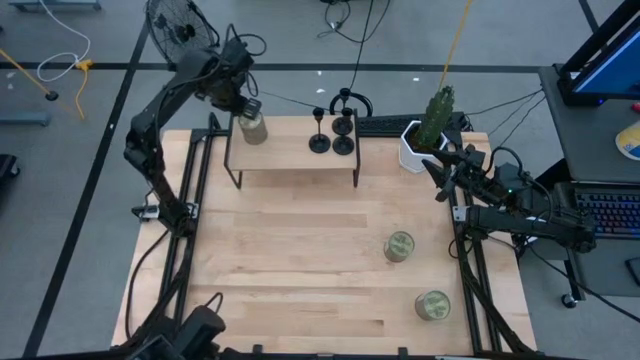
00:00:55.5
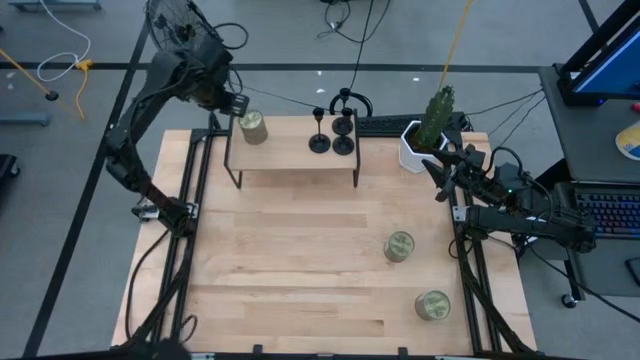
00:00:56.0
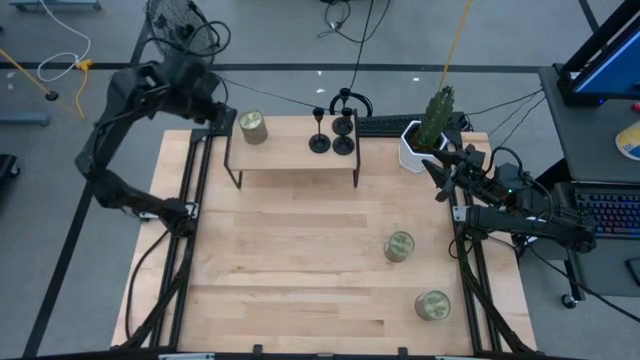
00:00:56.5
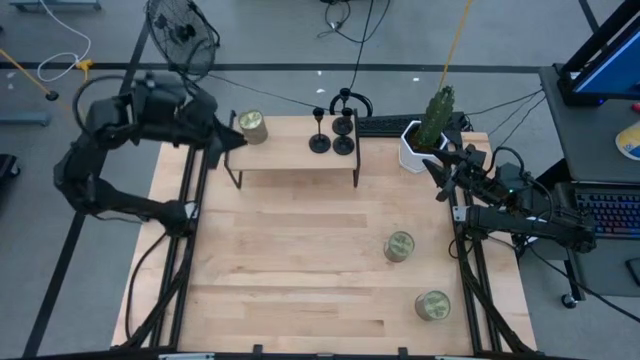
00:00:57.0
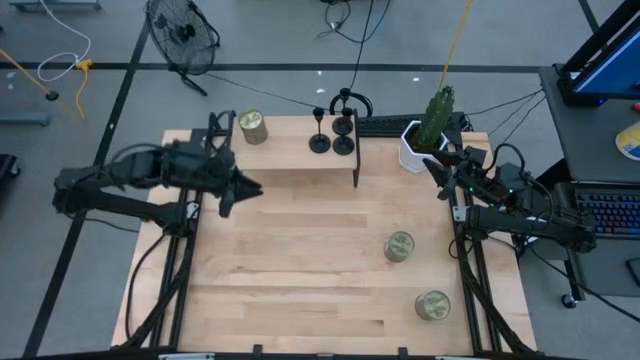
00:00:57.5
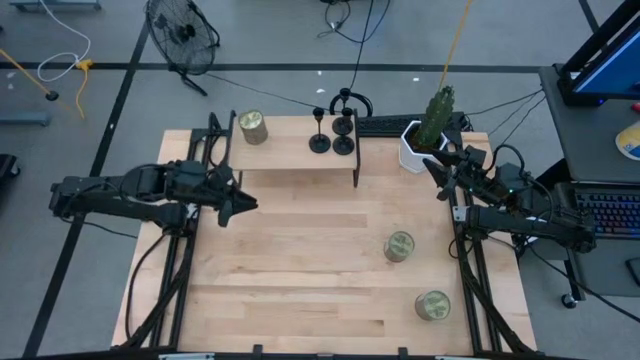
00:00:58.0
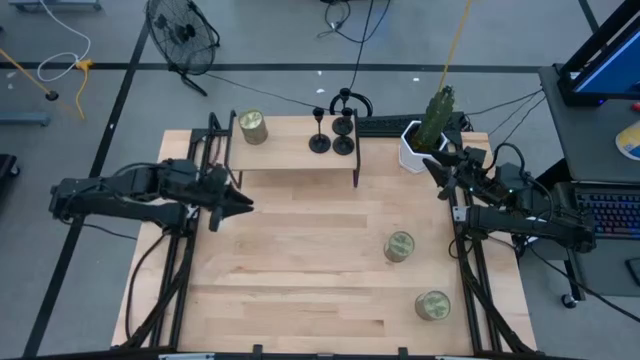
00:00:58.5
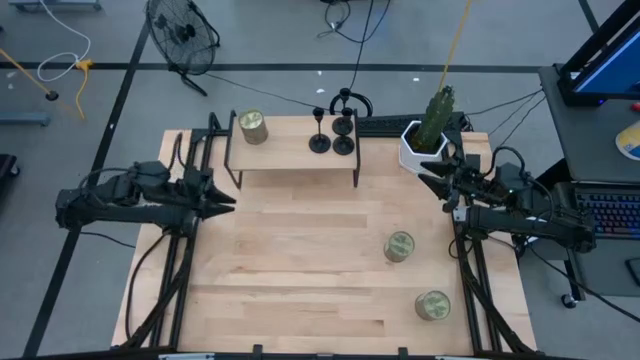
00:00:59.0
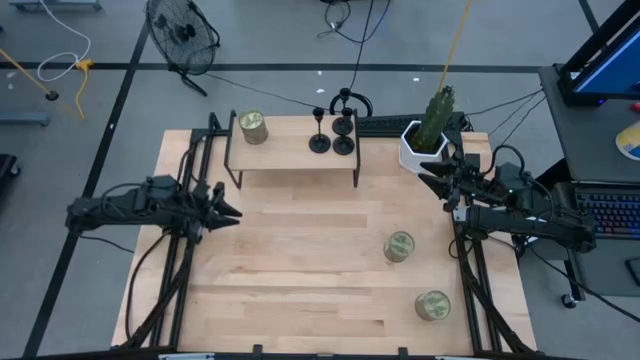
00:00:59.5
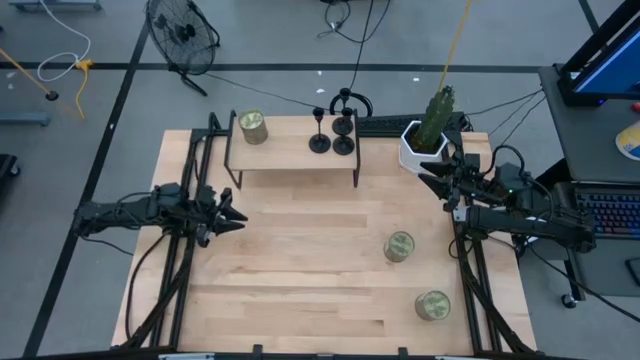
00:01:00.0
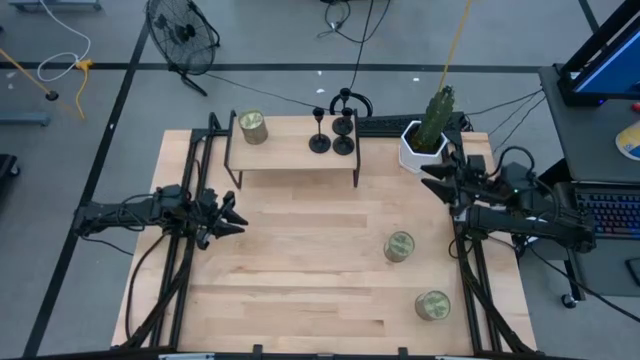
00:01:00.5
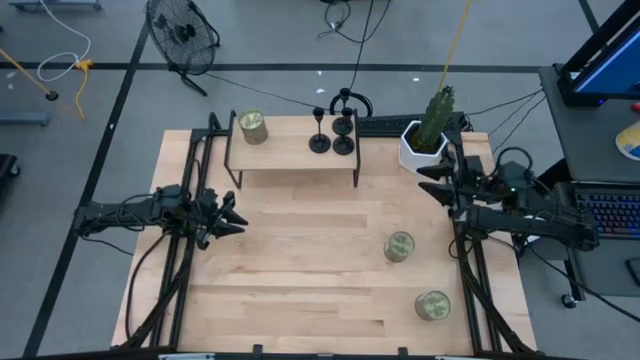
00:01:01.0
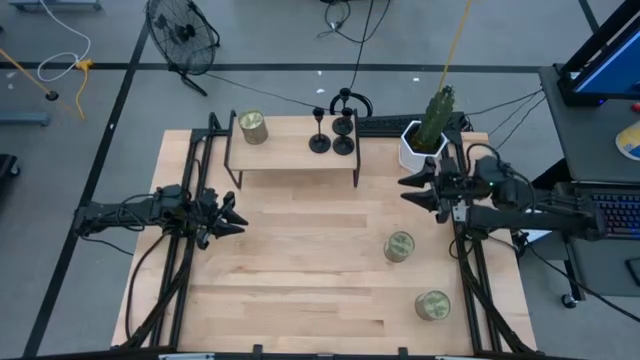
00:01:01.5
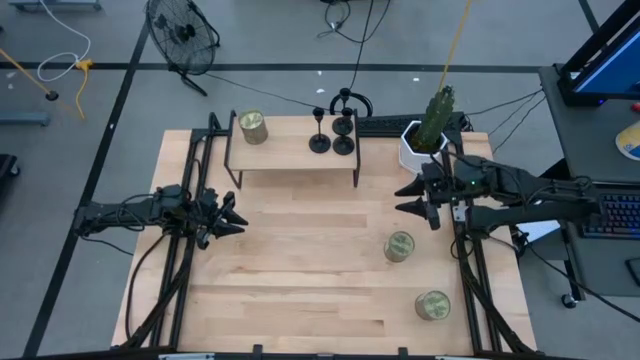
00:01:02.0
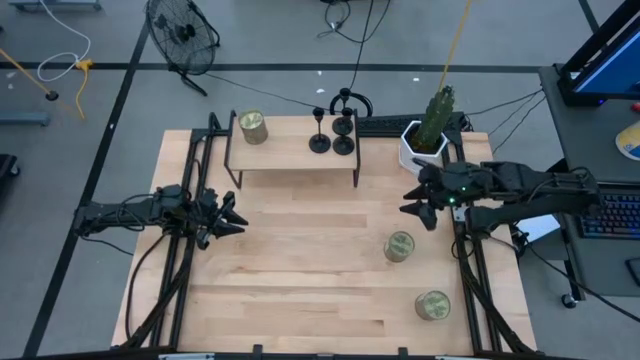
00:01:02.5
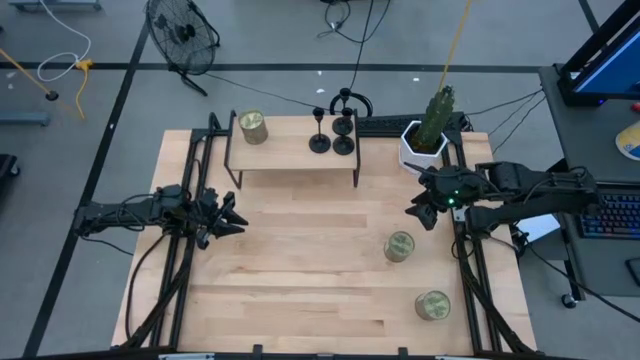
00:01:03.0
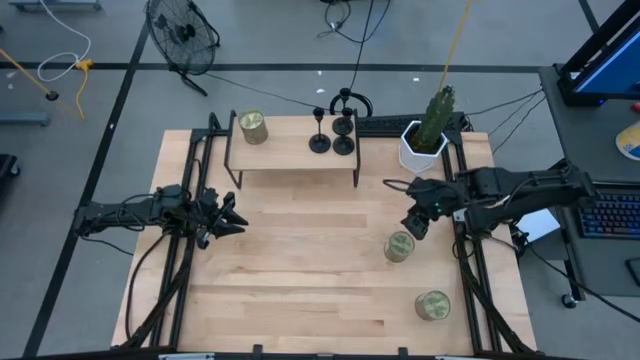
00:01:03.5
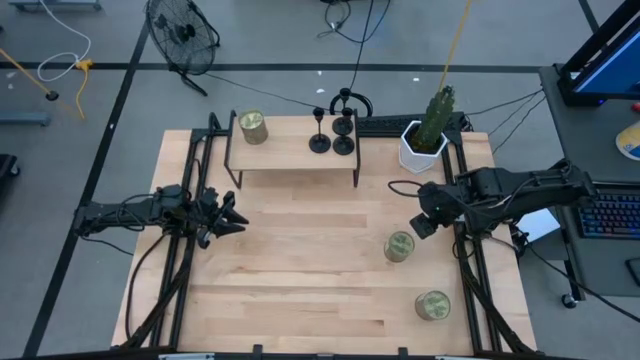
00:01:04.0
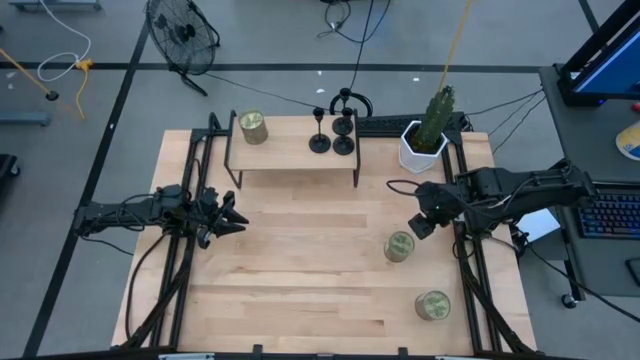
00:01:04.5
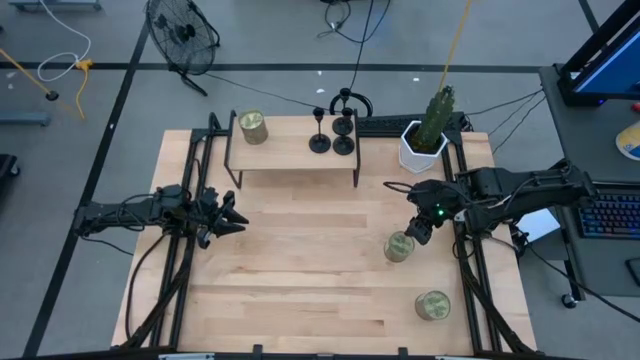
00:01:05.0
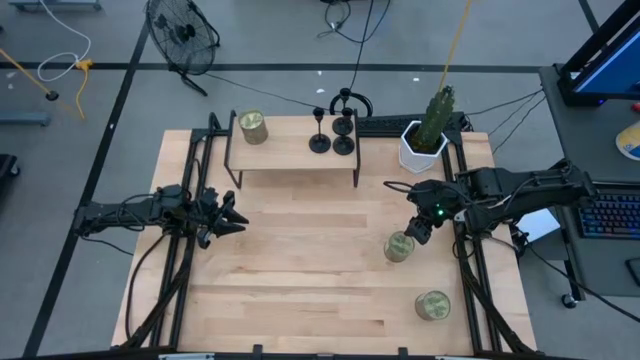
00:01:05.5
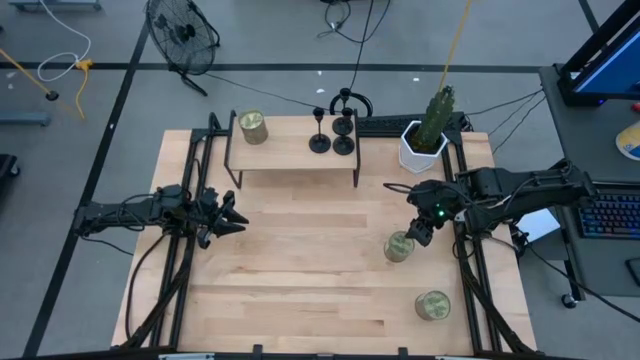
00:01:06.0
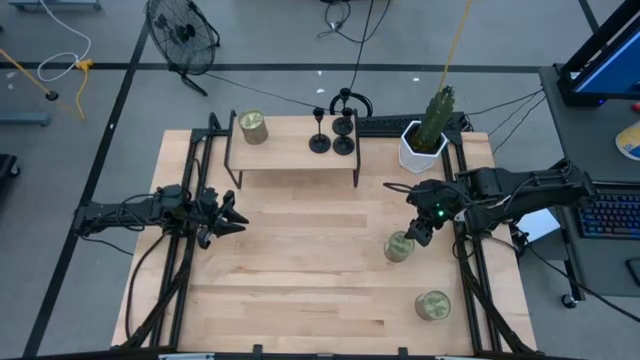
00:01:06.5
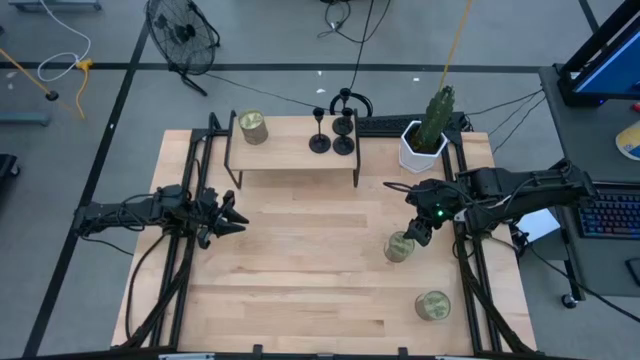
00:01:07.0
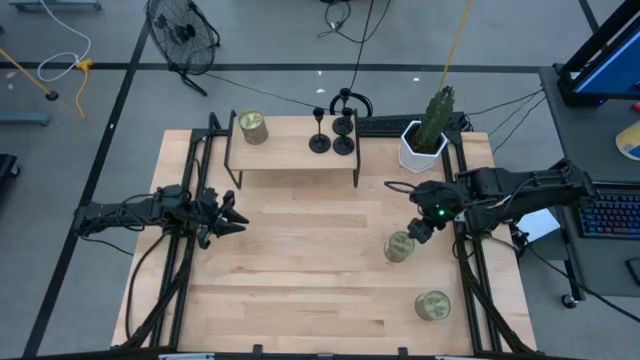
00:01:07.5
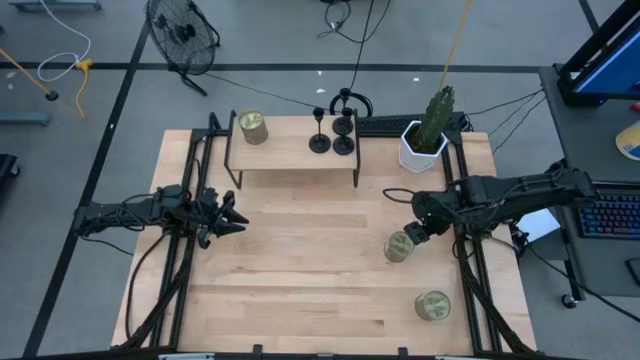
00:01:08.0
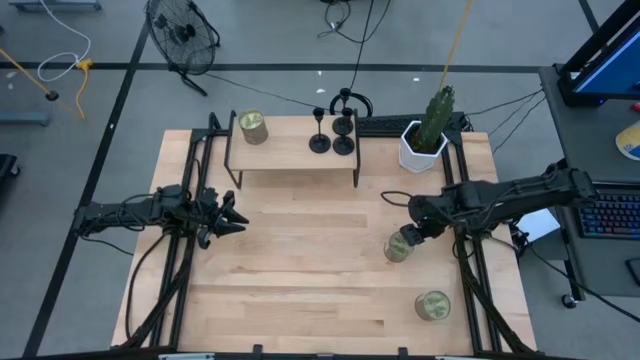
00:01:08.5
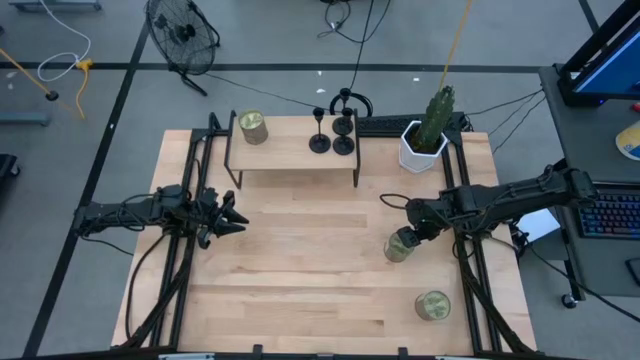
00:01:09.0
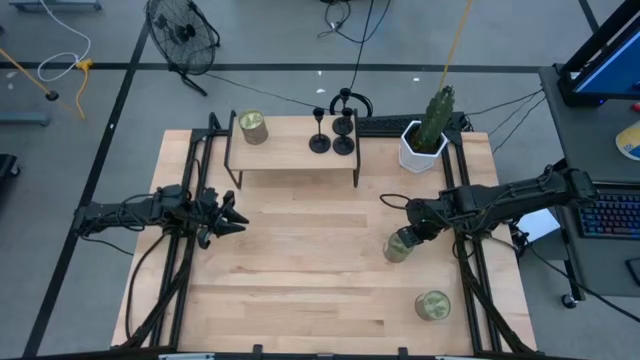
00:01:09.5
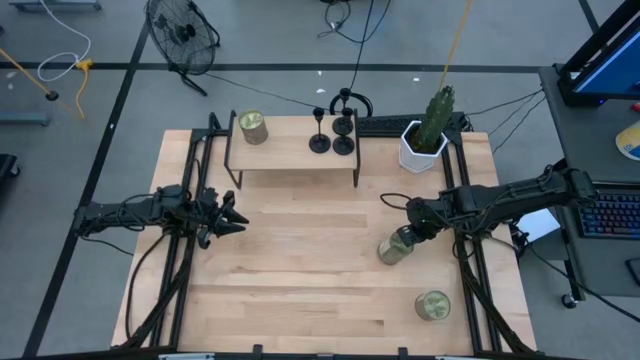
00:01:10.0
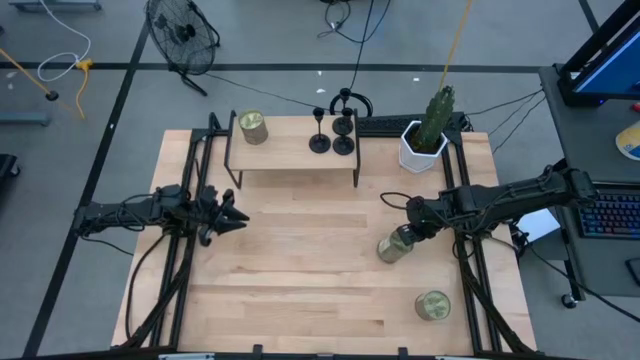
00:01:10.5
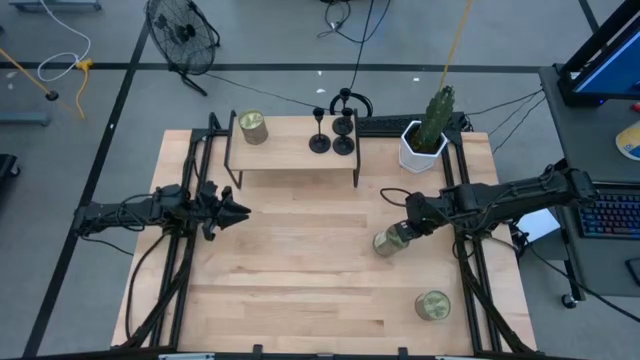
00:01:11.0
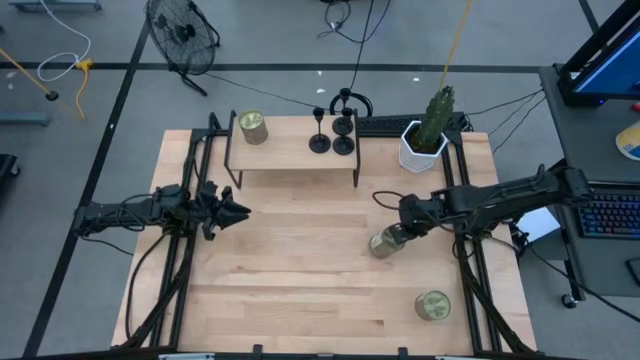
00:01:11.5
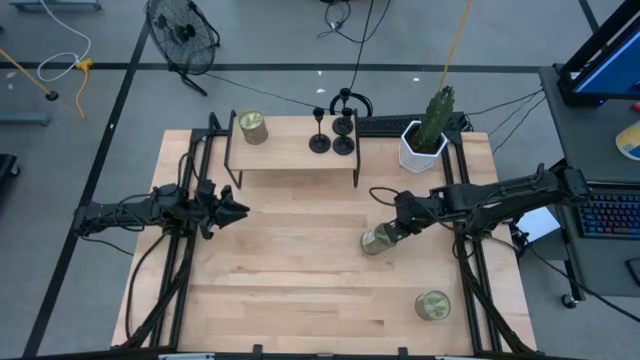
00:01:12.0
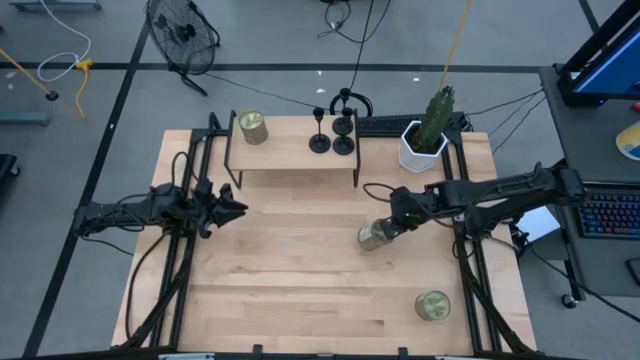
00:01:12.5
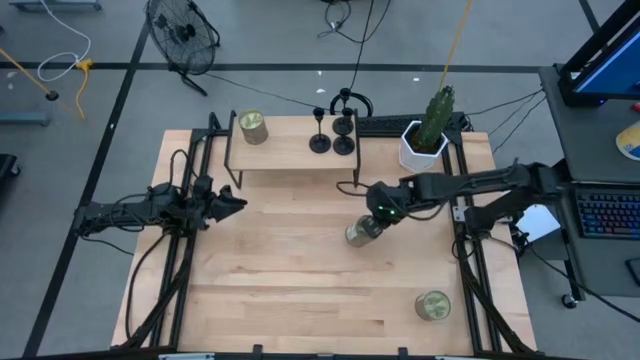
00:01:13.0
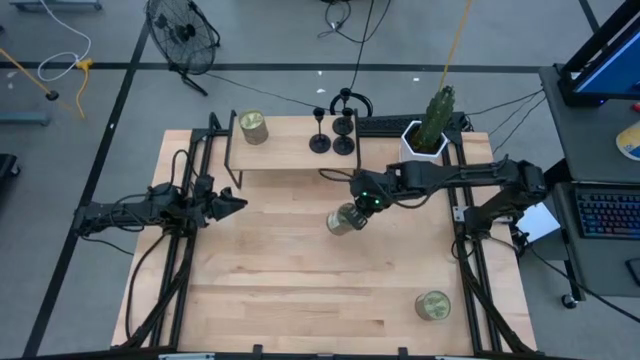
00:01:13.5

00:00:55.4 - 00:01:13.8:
Task: Pick & Place candle stick holders
Put the top scented candle on the shelf

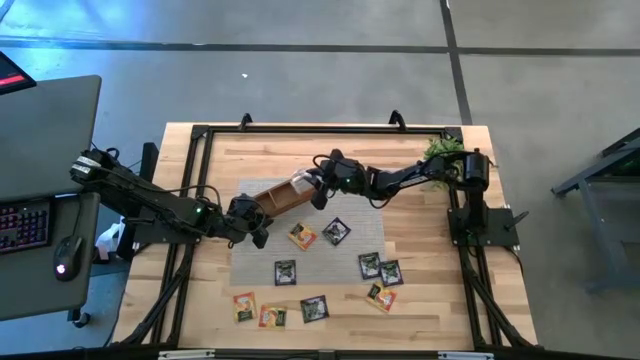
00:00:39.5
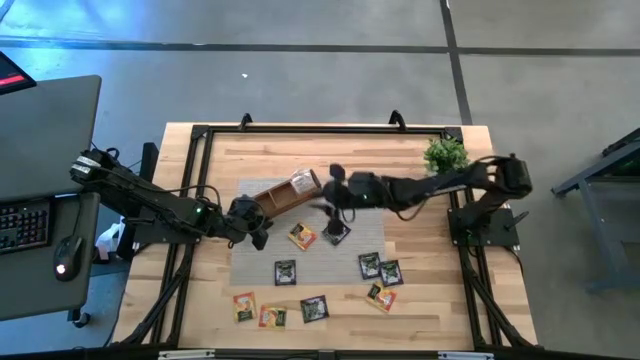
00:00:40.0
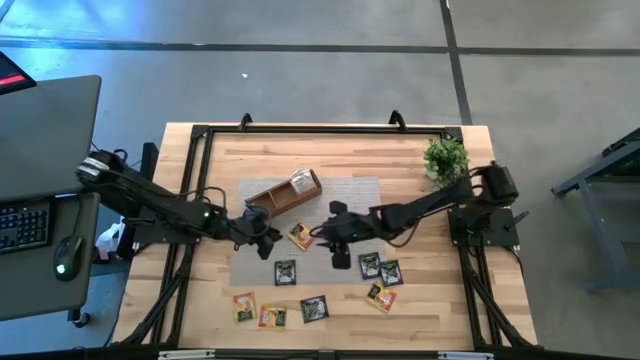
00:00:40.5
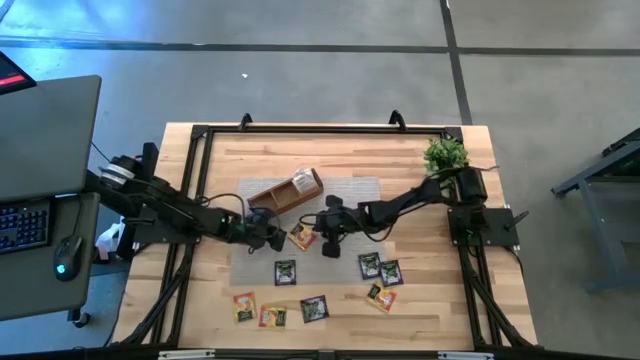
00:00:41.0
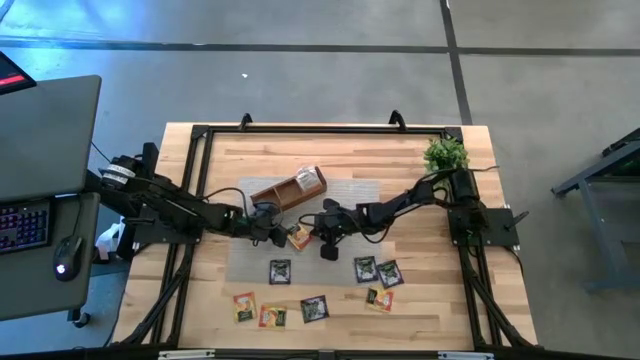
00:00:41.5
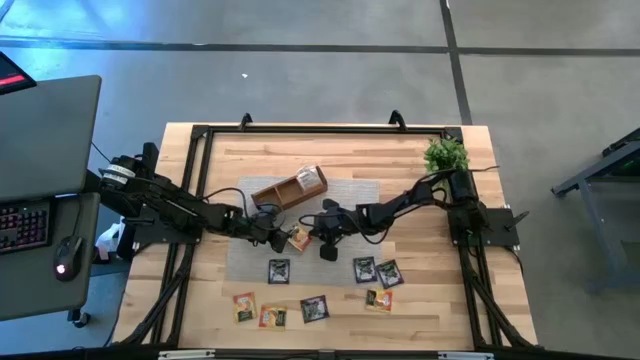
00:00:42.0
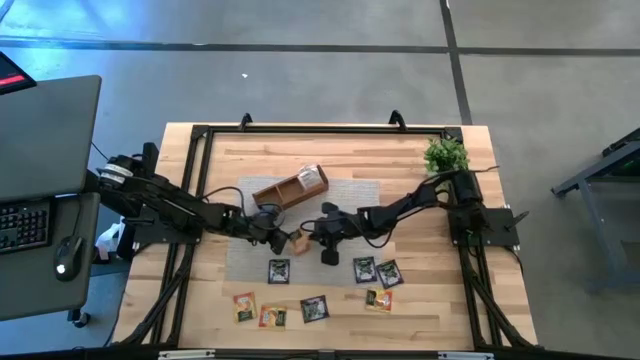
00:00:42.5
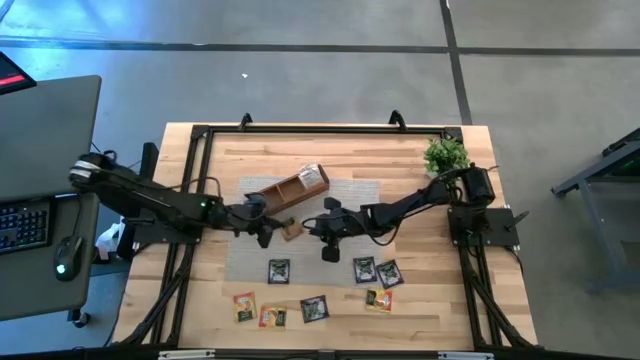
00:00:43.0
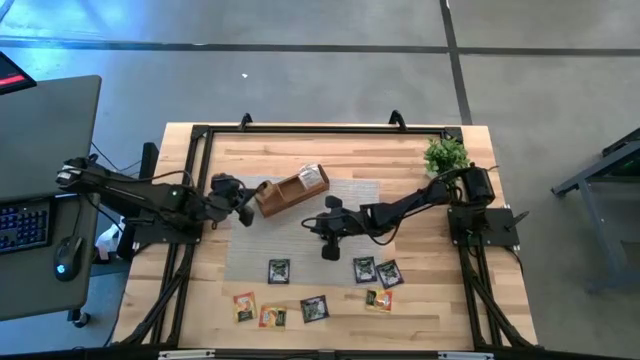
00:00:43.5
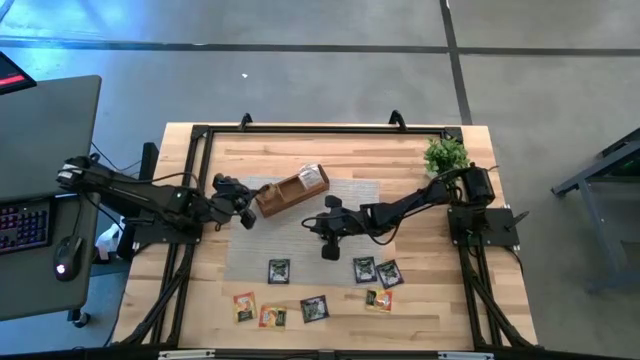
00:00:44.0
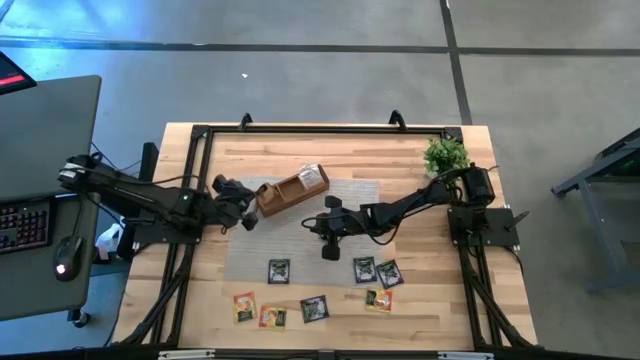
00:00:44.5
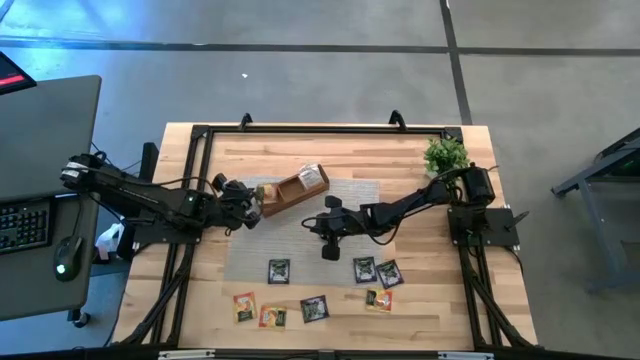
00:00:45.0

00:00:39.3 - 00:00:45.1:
Task: Pick & Place Tea
Put the yellow tea bag into the middle section of the wooden organizer
